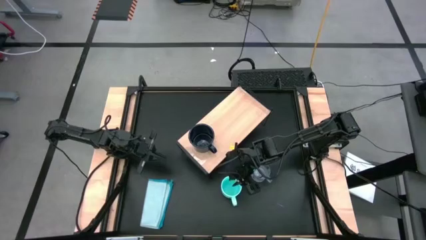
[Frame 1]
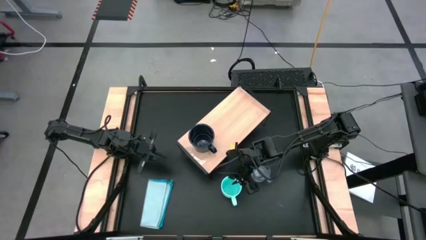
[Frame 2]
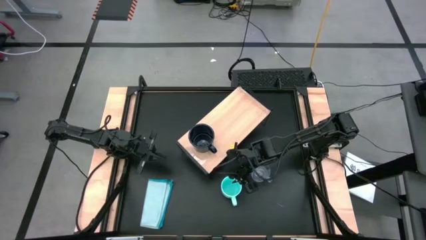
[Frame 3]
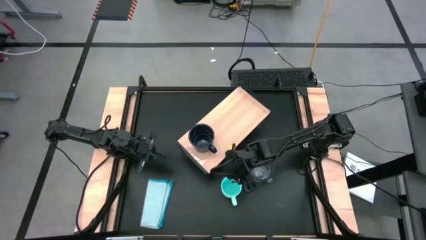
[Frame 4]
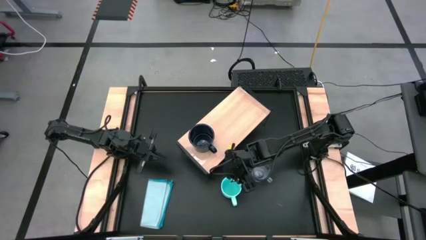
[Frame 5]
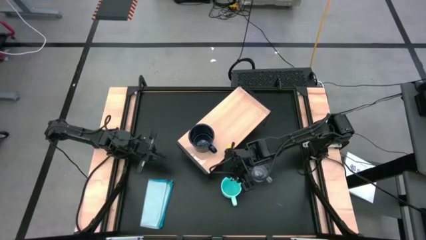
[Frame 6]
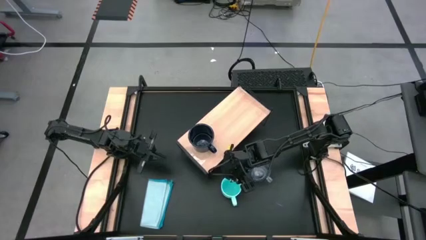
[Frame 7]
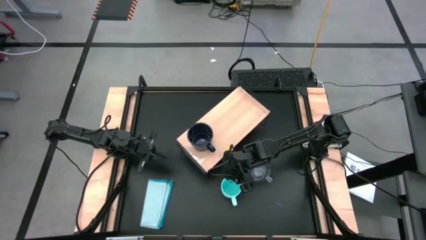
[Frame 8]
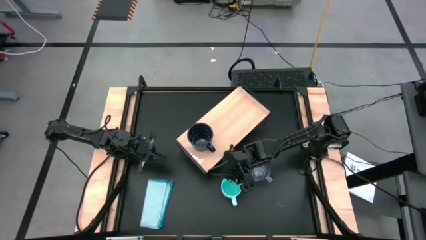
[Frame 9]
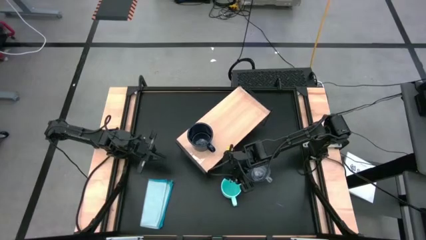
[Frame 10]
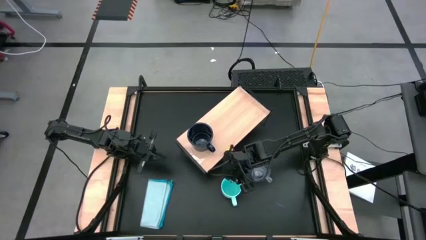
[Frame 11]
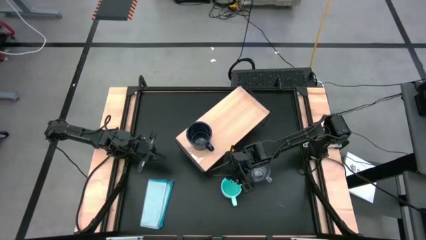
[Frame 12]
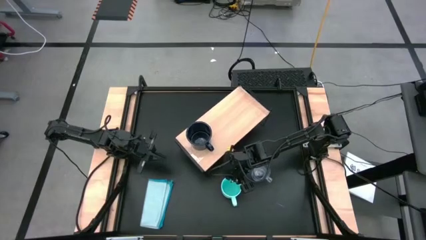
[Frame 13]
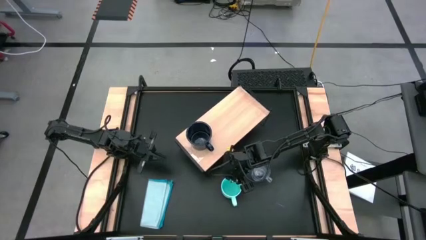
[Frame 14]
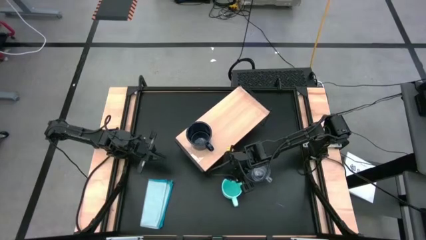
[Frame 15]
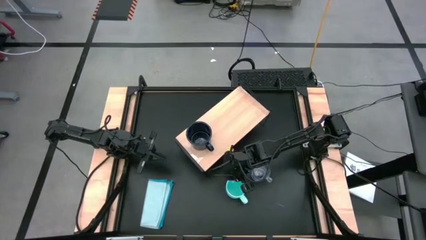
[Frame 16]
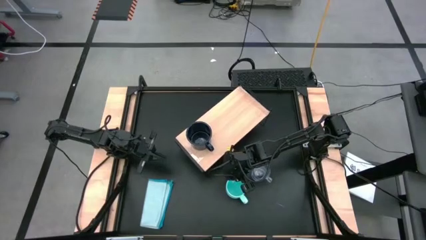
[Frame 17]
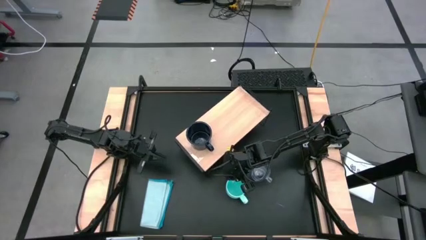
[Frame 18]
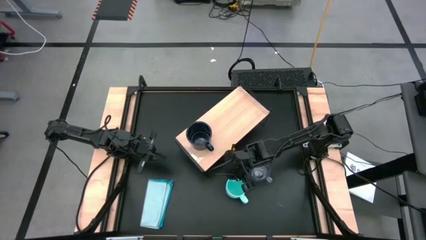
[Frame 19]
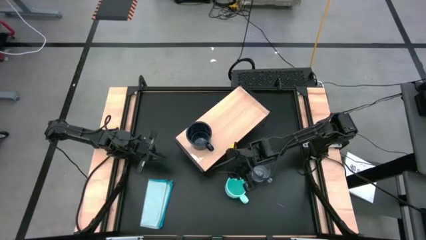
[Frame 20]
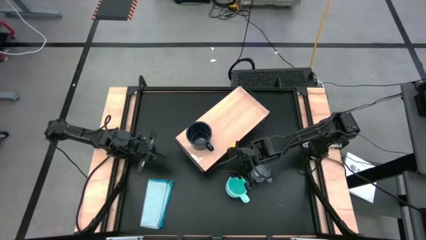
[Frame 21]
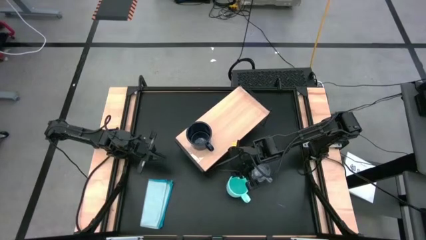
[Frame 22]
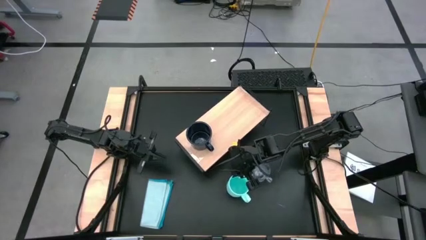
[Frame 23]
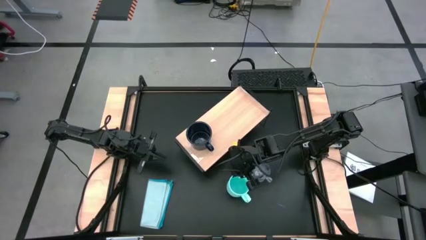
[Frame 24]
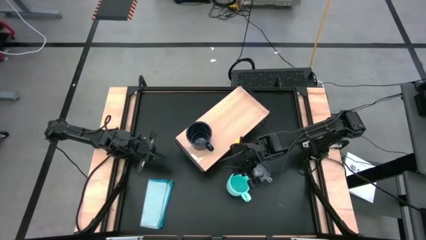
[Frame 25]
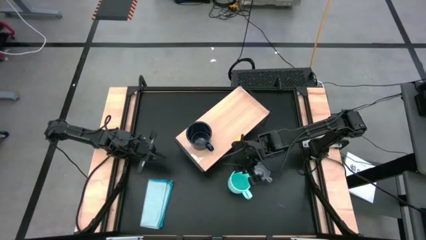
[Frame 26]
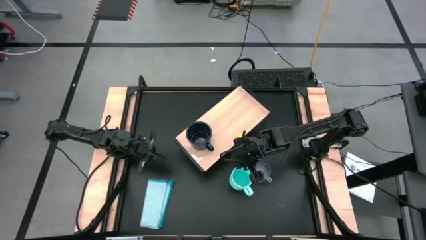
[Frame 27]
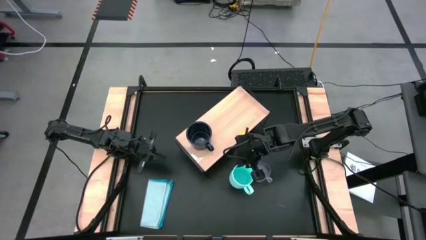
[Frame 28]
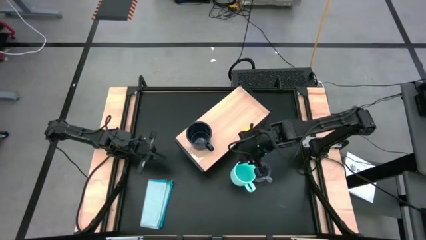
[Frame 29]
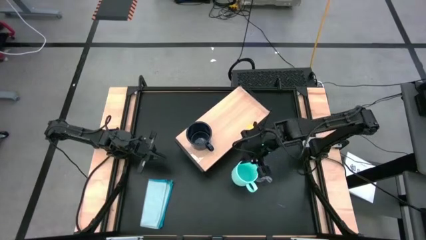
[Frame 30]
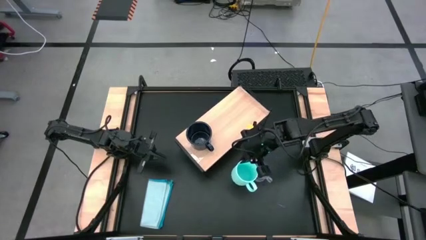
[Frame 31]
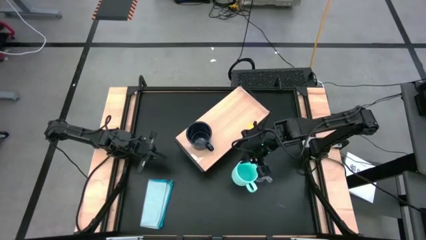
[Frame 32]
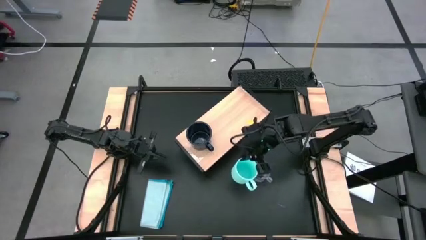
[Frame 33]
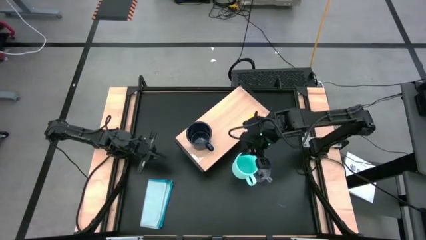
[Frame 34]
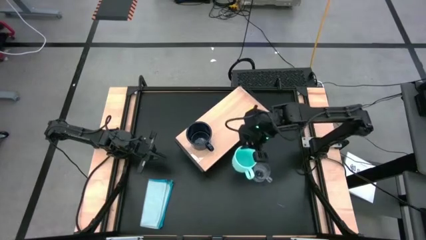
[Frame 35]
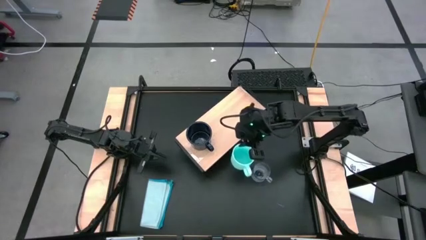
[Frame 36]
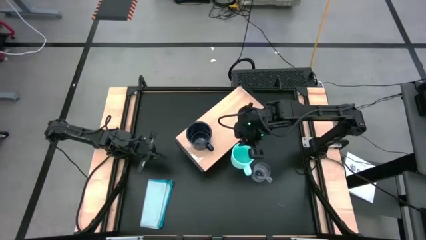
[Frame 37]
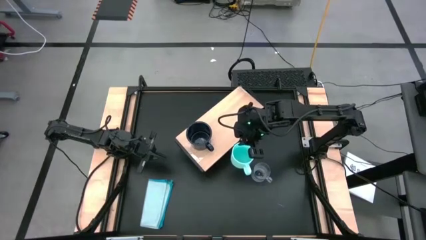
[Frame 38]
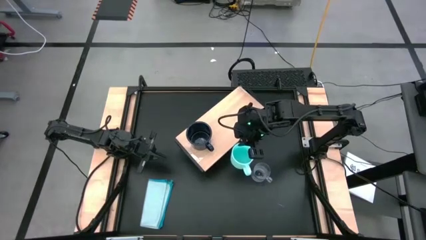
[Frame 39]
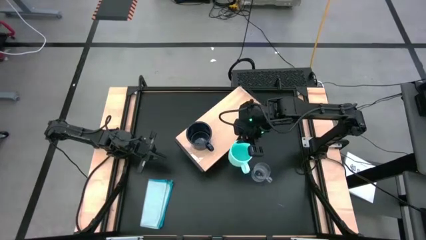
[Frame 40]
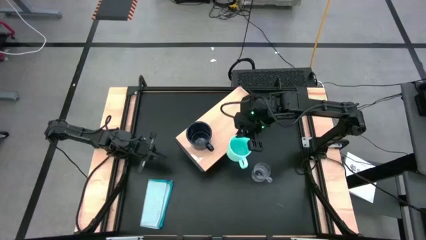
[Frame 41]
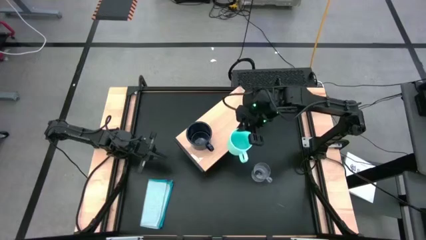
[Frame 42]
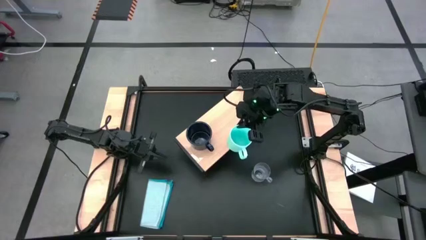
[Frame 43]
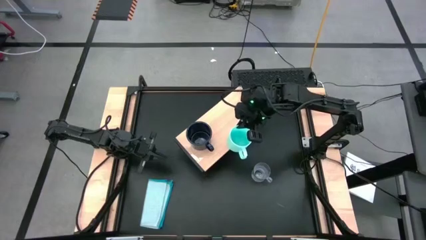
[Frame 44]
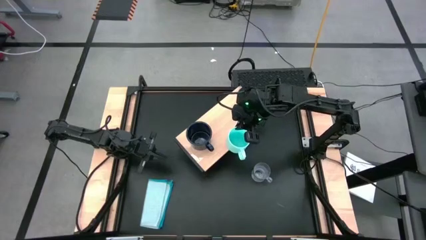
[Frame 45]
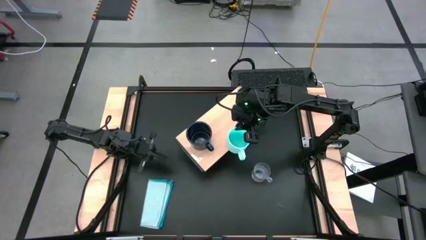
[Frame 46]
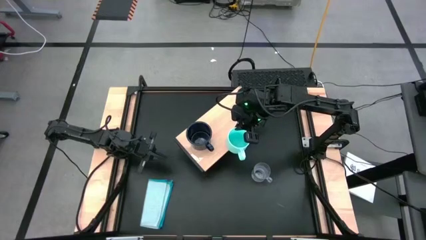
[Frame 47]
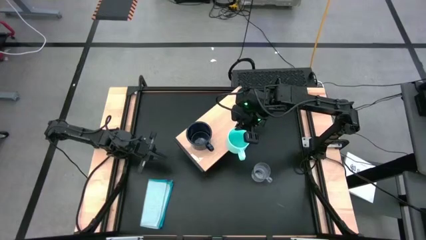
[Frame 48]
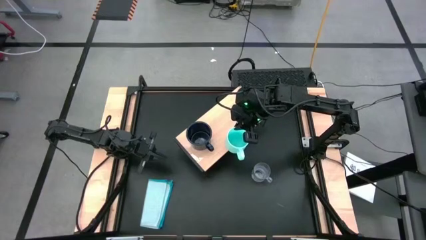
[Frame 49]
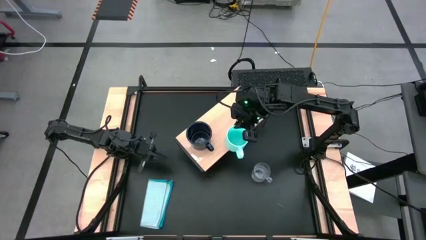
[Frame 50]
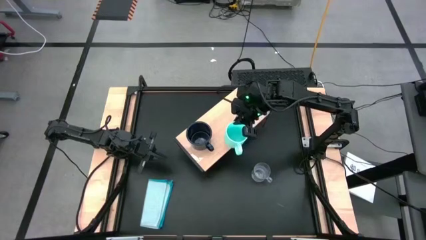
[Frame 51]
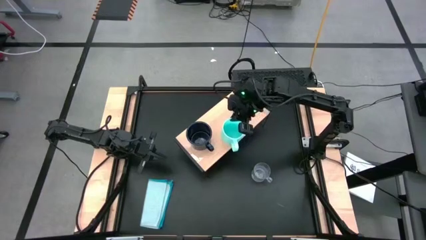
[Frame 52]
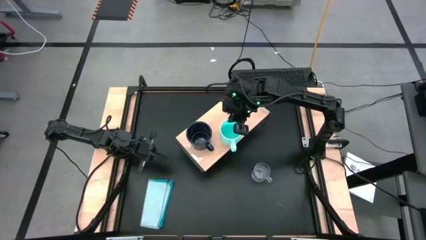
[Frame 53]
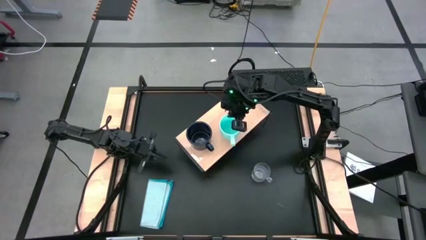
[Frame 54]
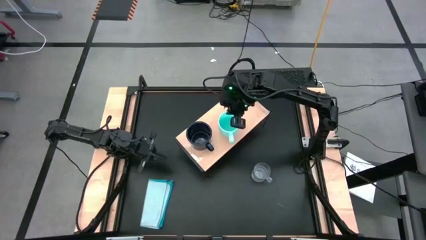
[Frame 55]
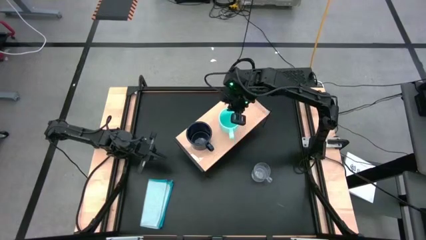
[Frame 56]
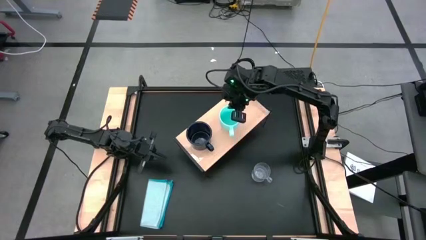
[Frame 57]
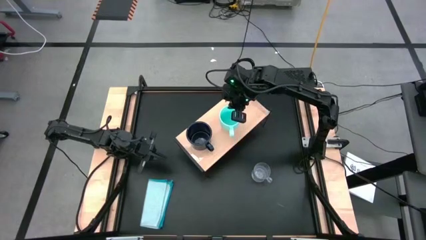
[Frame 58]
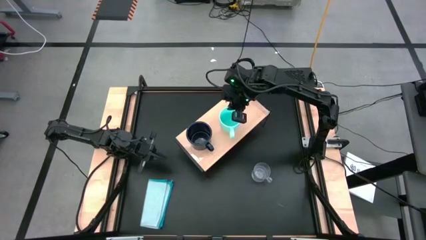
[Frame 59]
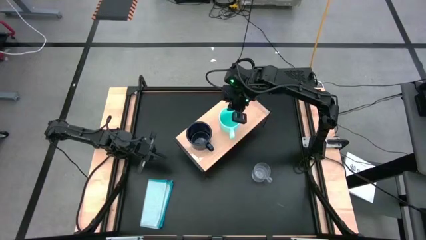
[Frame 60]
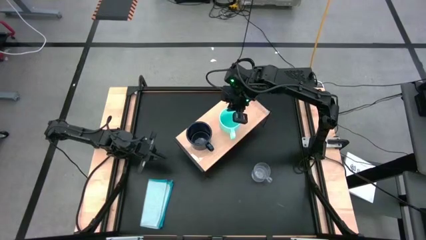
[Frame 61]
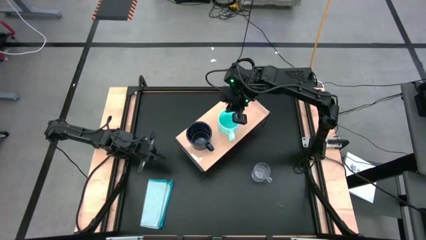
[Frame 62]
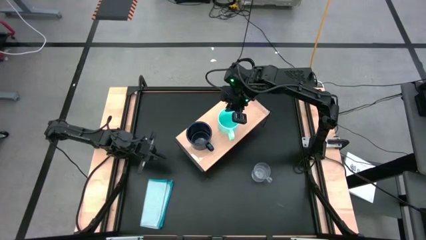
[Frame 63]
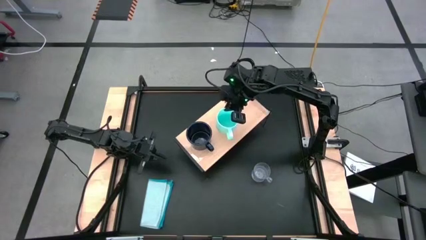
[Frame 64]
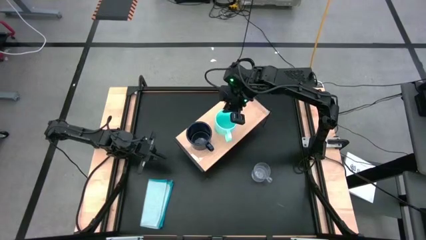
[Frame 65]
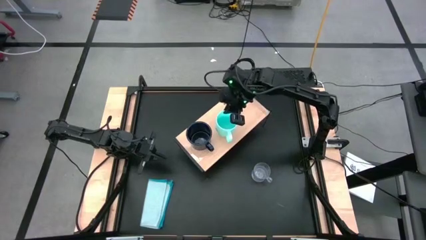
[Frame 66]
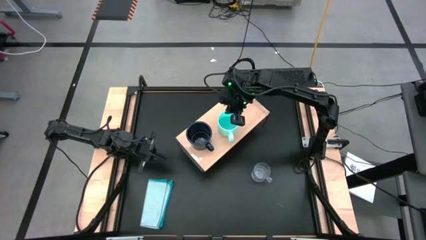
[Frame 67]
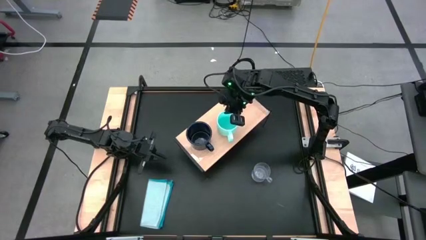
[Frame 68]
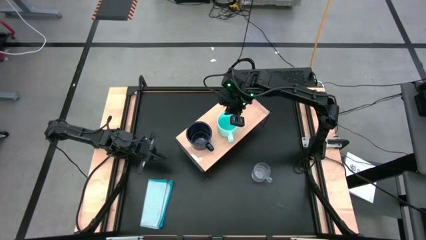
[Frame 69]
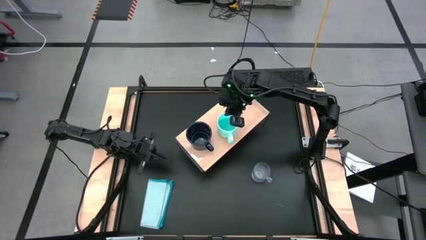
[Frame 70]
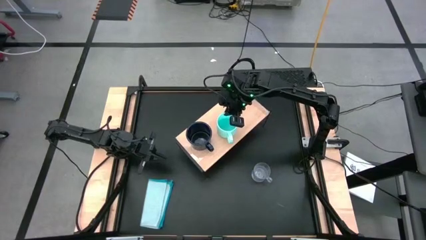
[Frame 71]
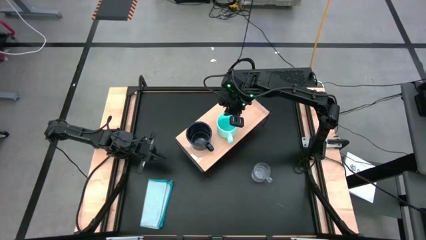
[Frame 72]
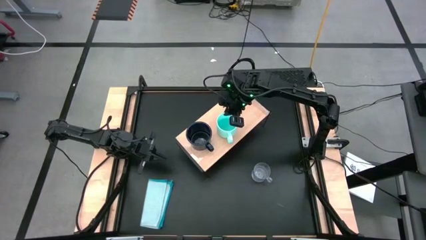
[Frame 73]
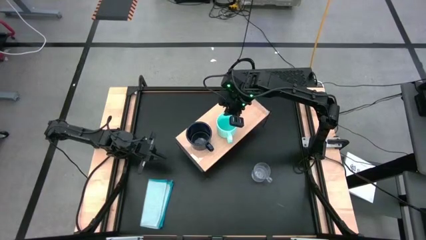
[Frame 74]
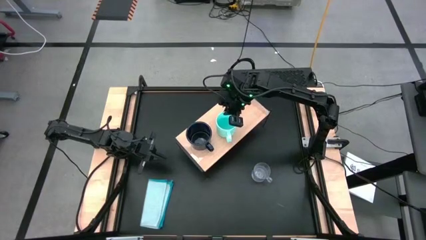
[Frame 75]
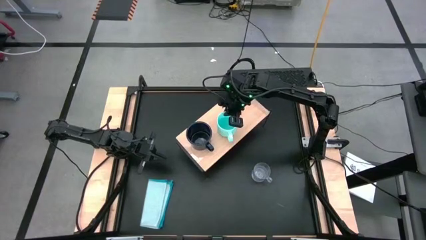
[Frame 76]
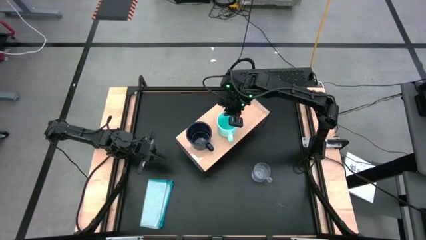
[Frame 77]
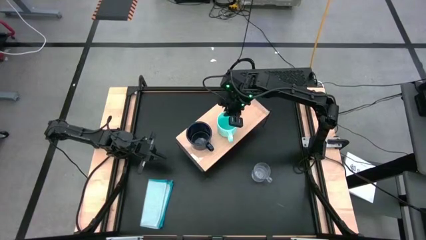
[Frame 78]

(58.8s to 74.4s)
Task: Stack small to large cups/mugs on shelf
Put the blue cup on the shelf
